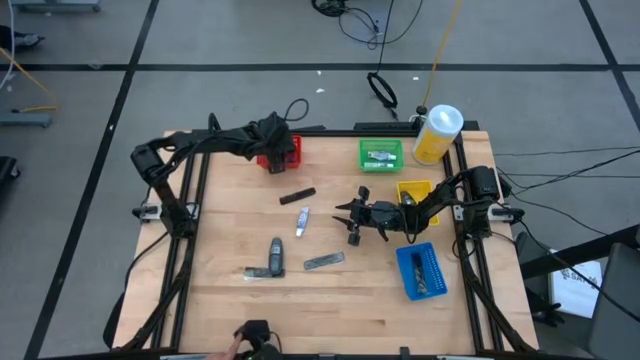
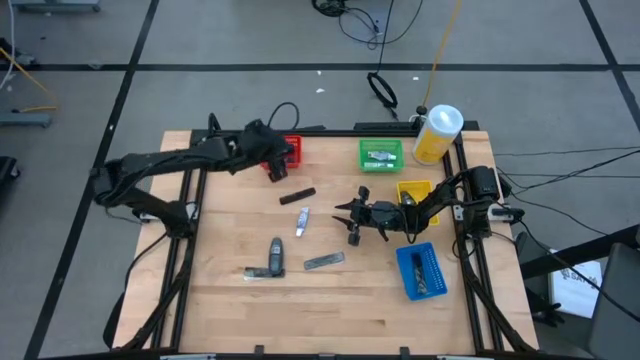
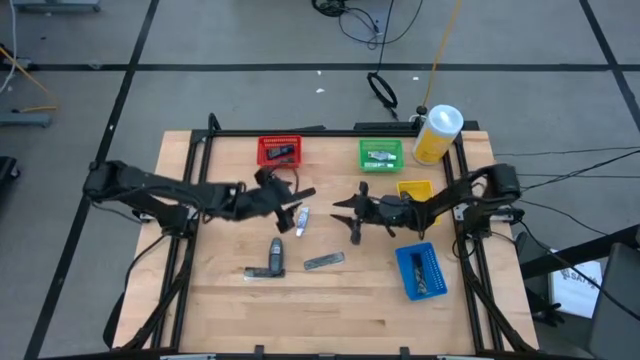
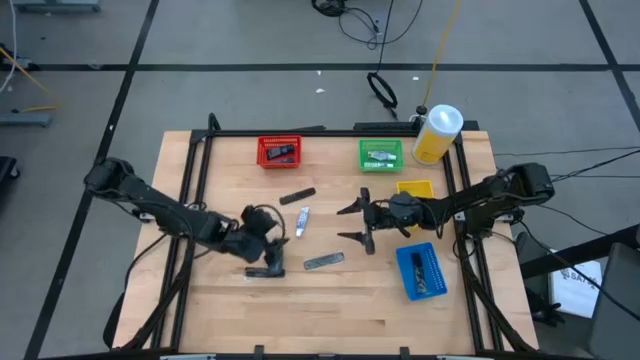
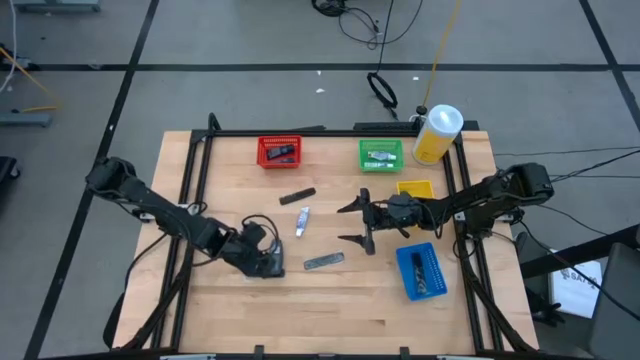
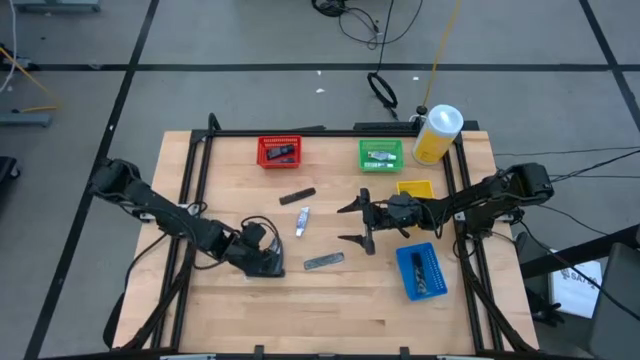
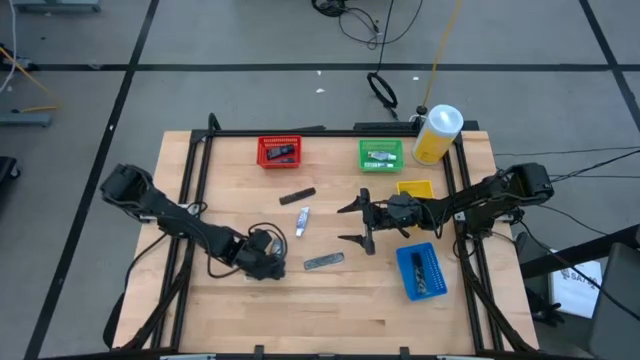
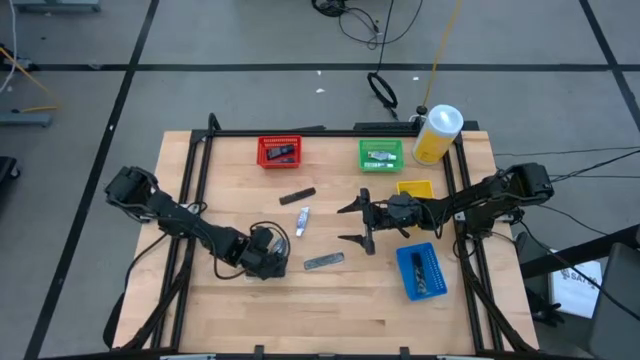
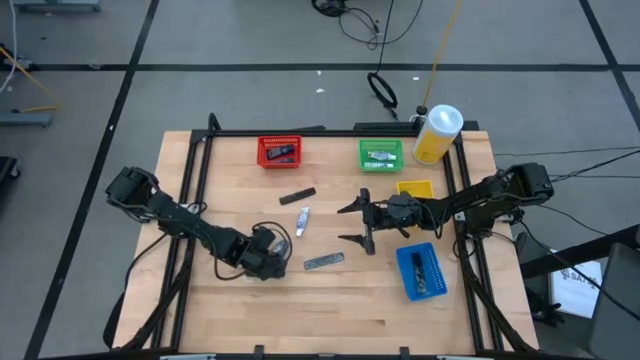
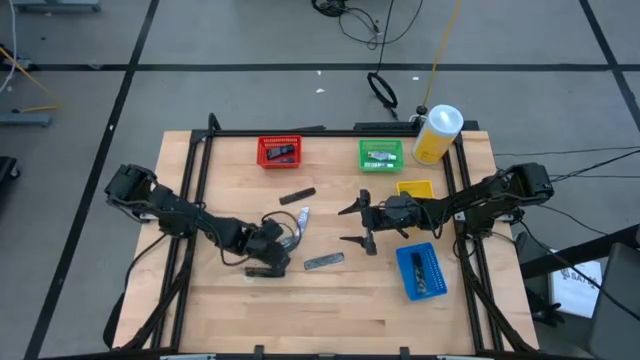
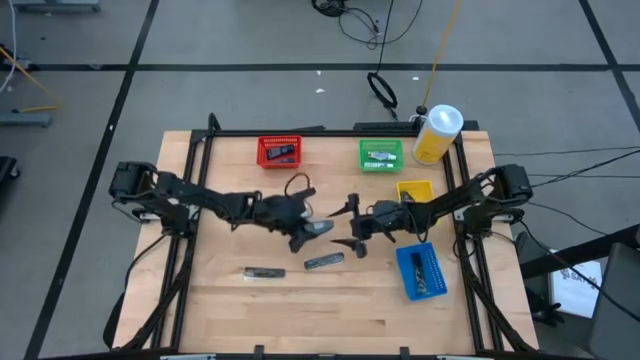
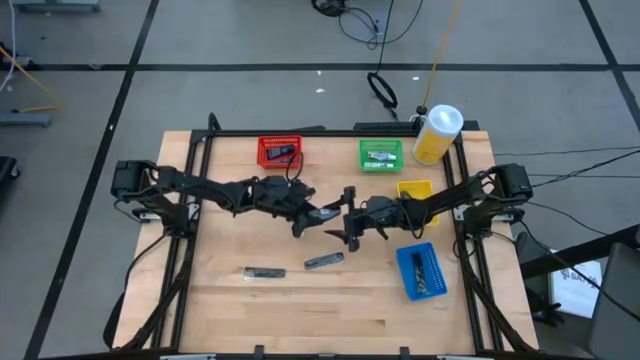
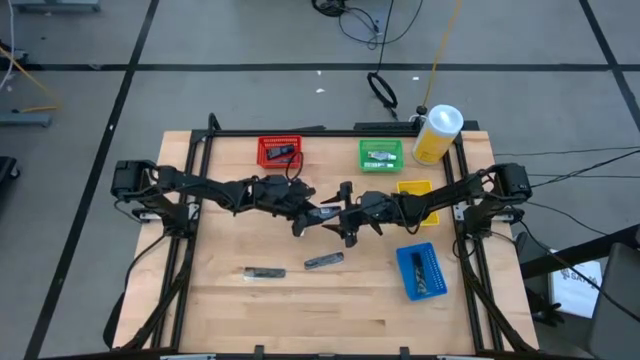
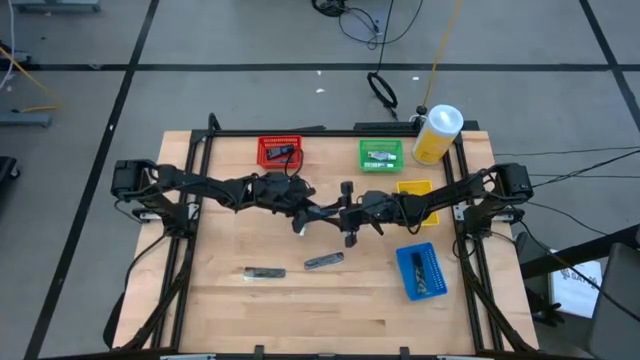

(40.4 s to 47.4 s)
Task: Pick & Place Travel size toiletries
Put the gray deodorant into the yellow bin

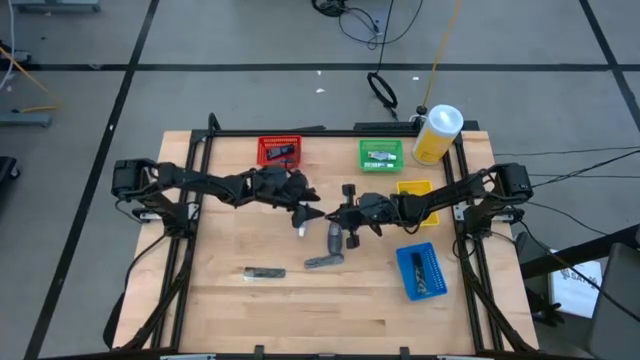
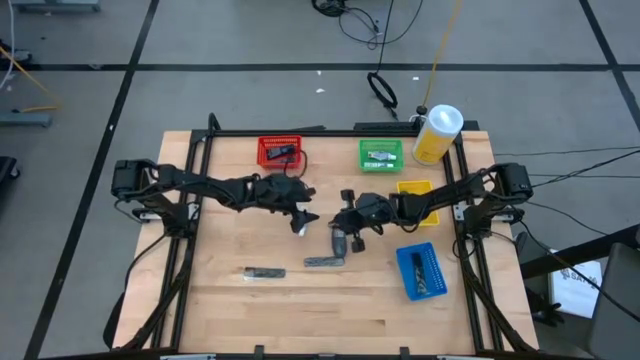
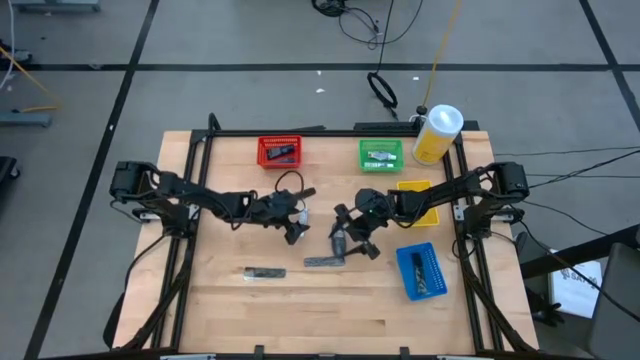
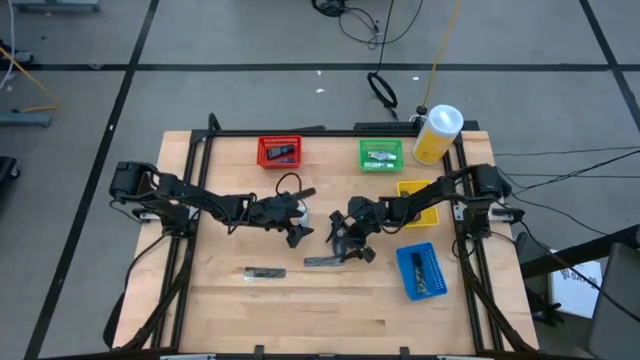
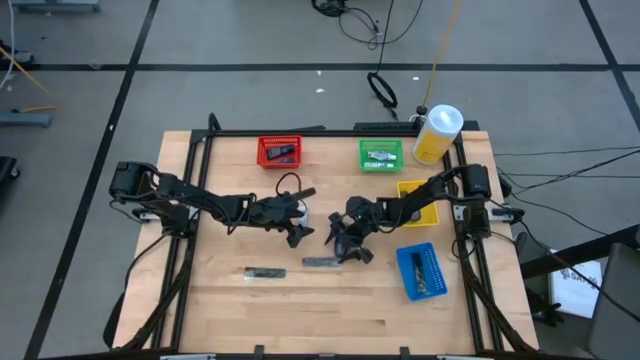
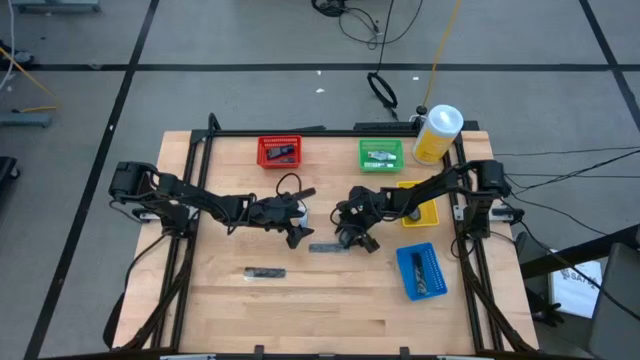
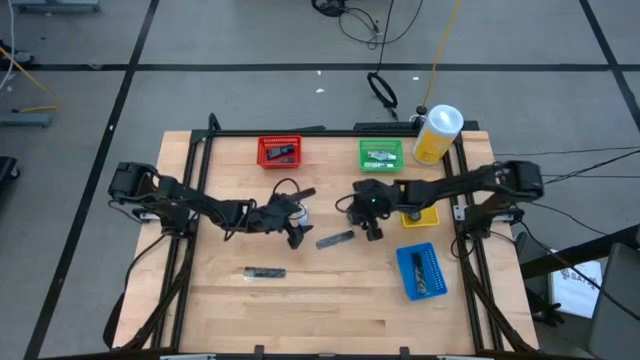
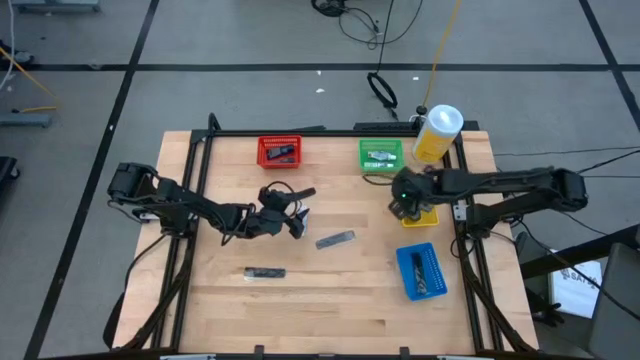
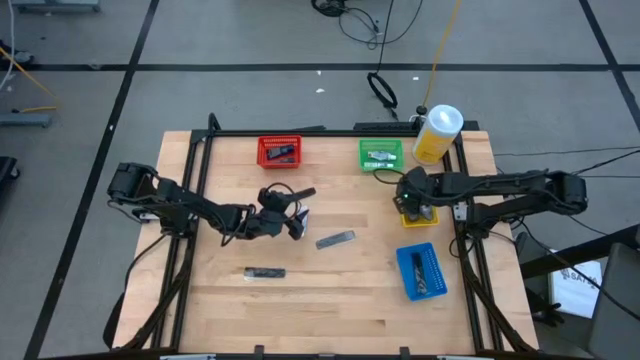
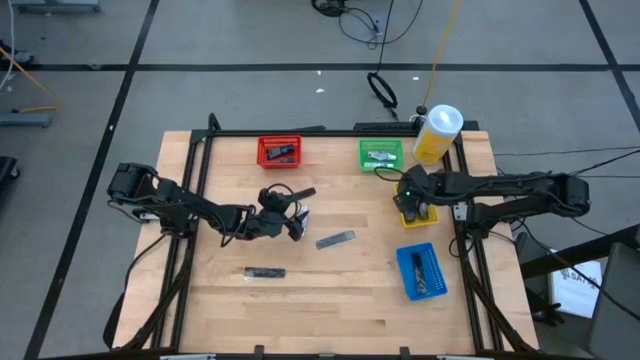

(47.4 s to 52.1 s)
Put the gray deodorant into the yellow bin

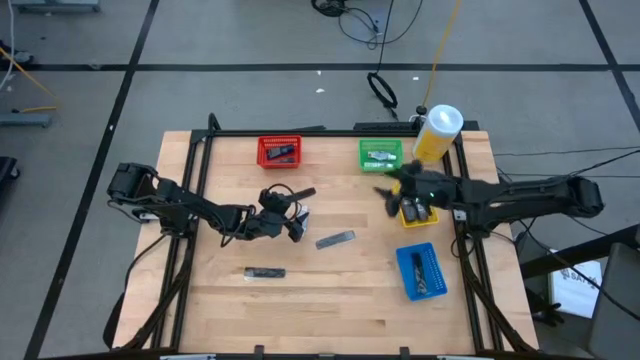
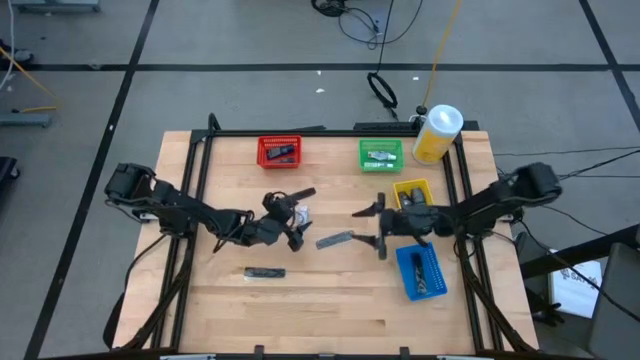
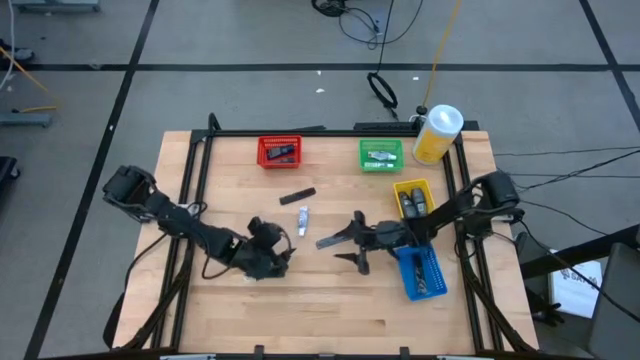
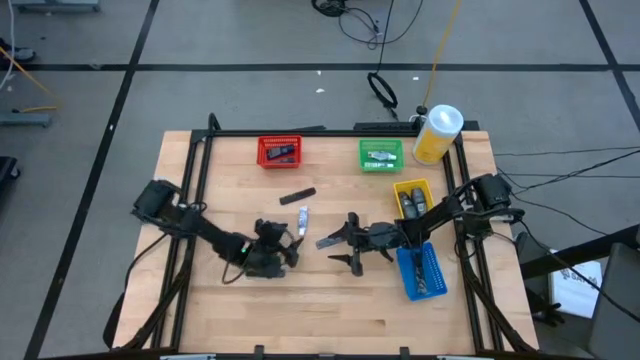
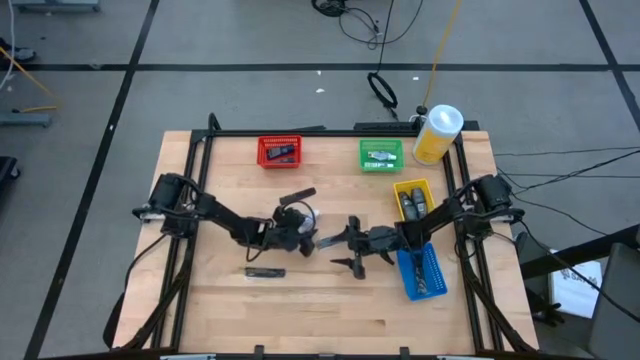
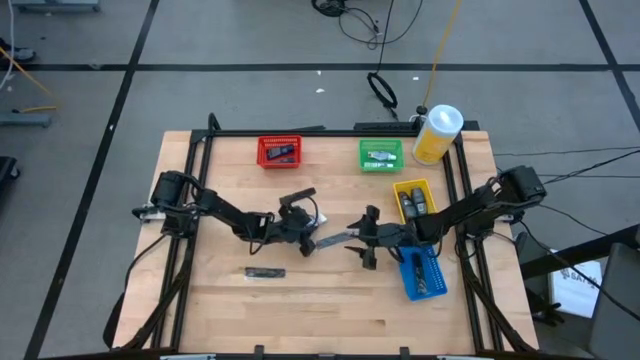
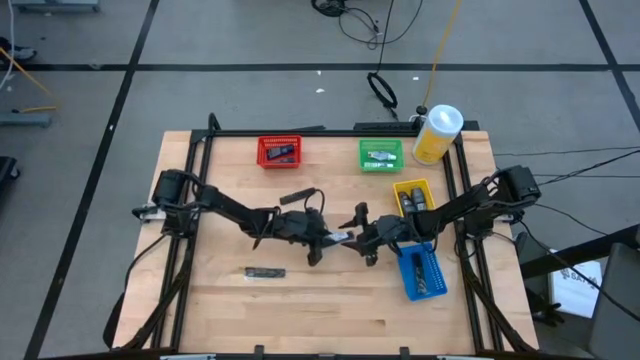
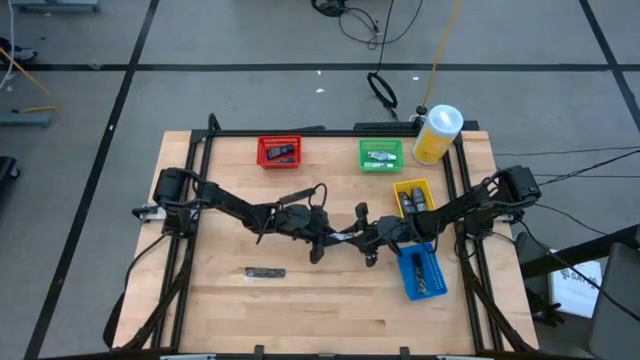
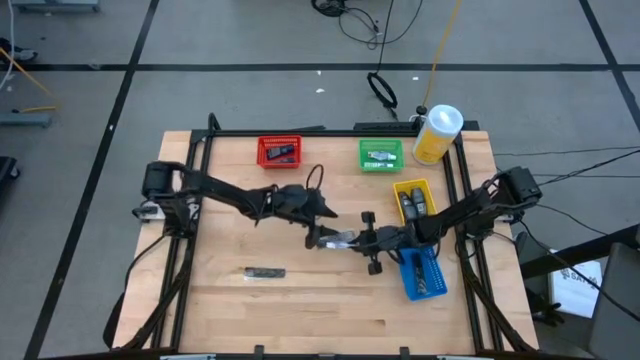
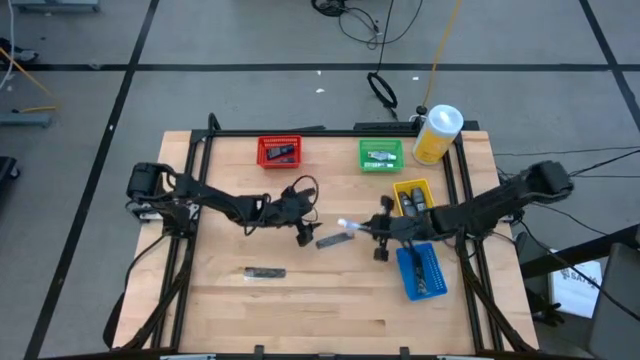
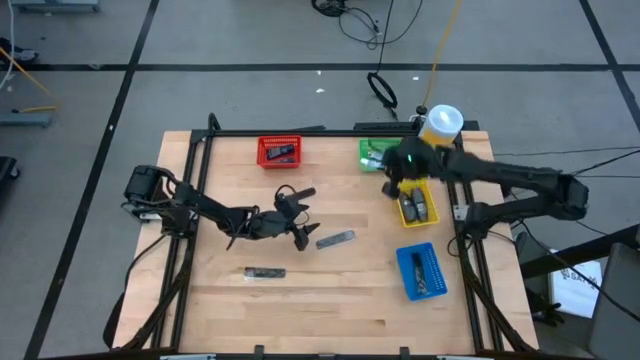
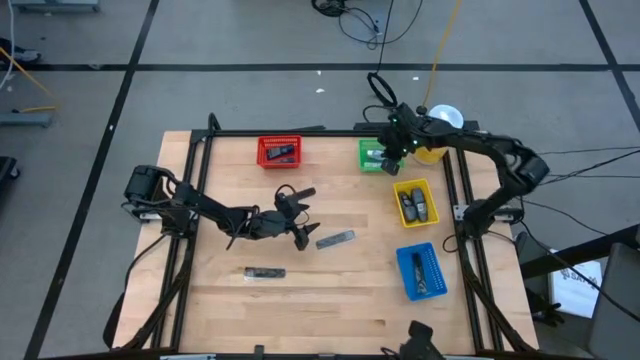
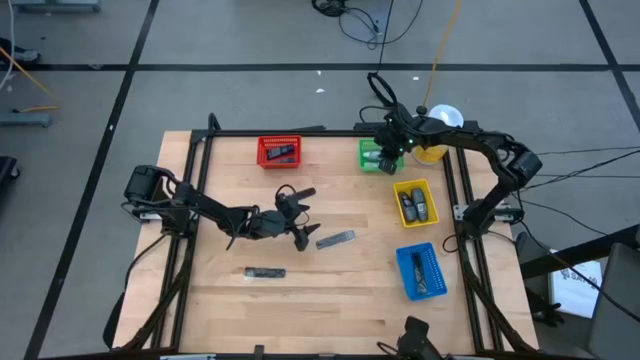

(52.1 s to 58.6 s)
Put the white toothpaste into the green bin

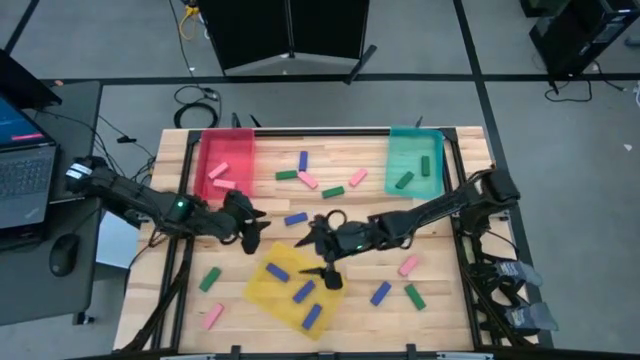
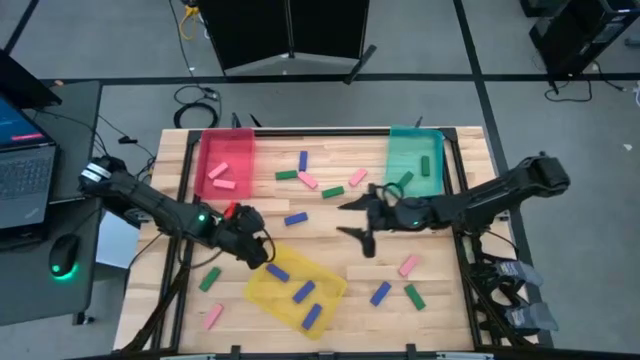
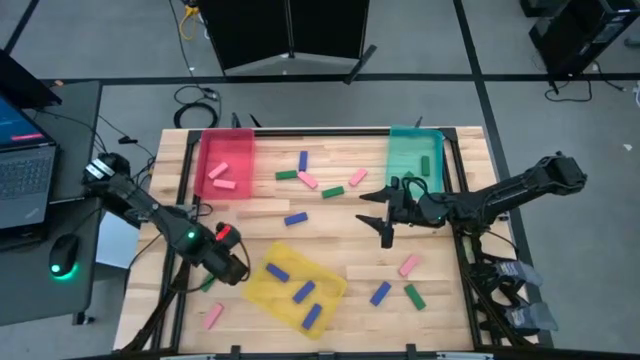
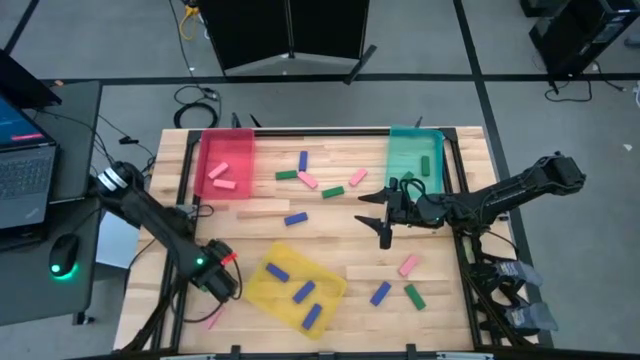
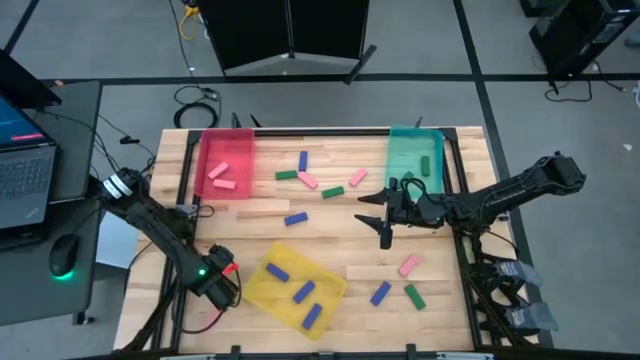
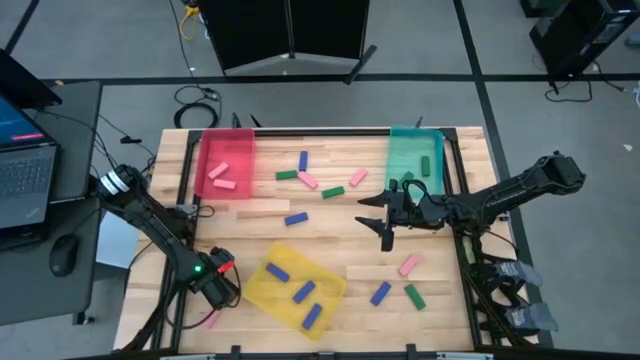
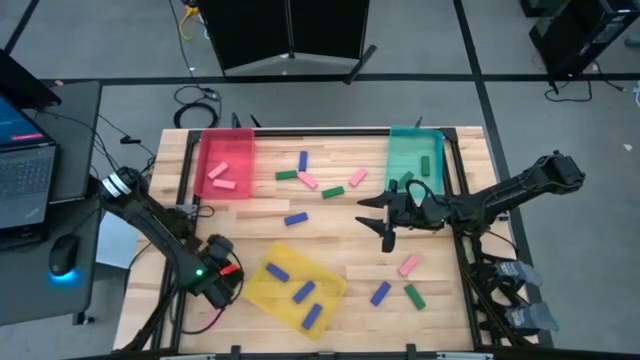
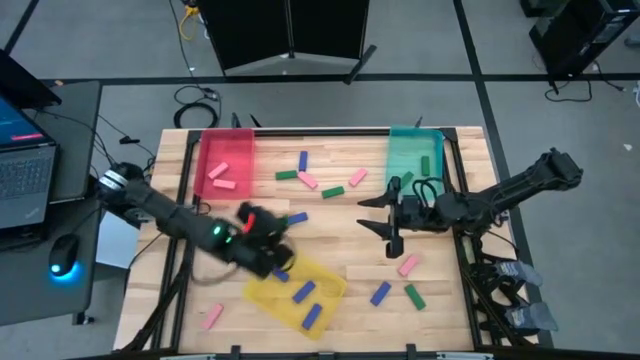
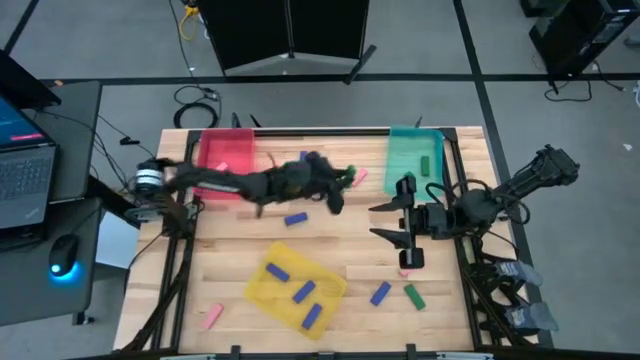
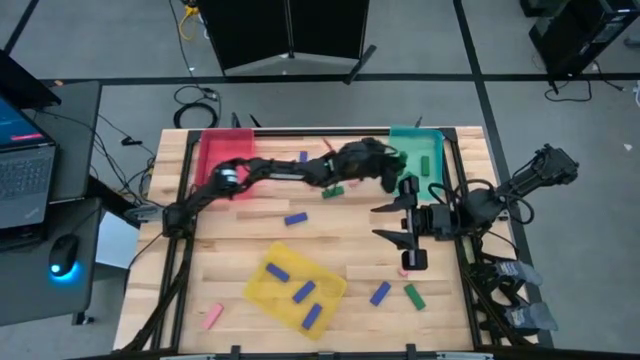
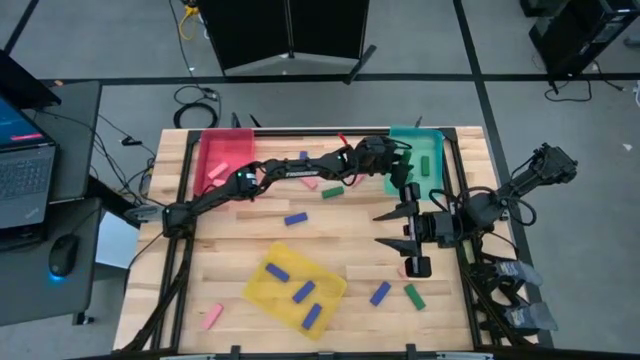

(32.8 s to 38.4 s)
Task: Sort blocks
Put the green block into the blue bin
